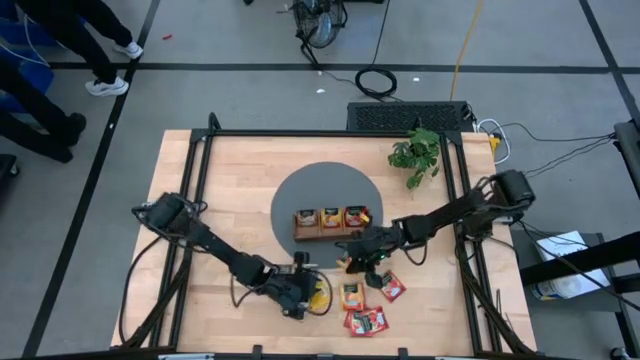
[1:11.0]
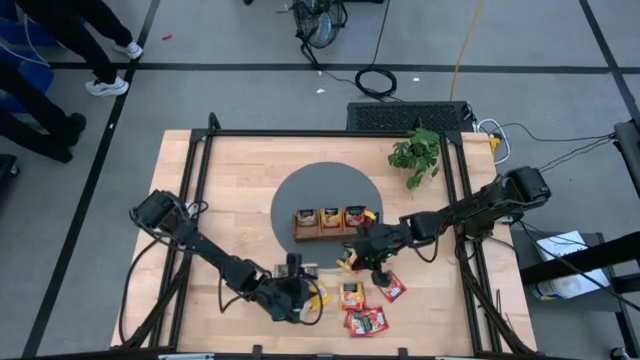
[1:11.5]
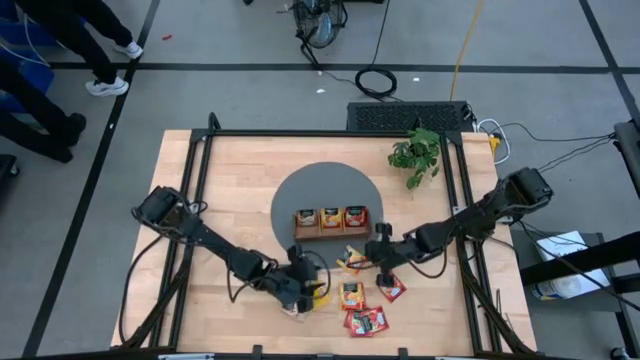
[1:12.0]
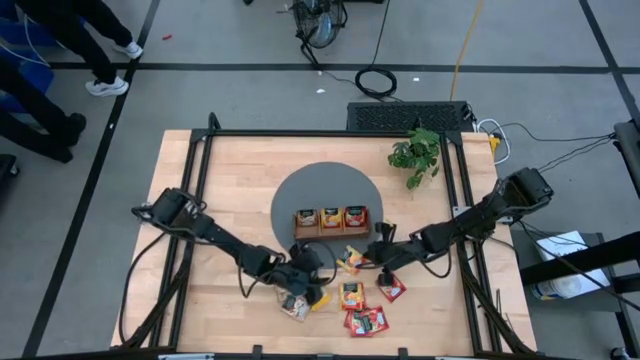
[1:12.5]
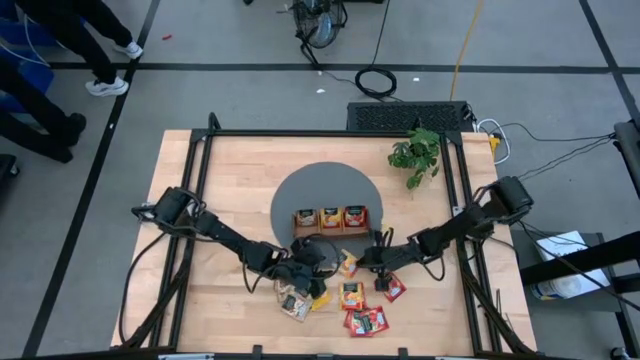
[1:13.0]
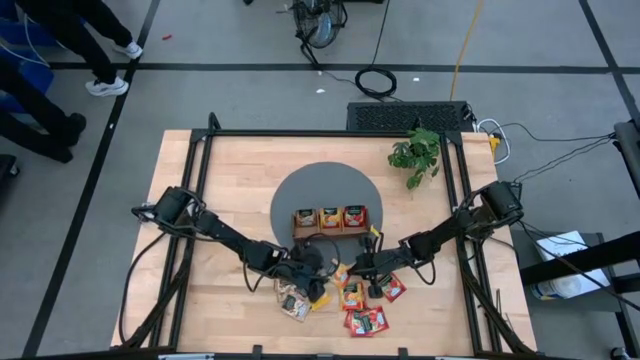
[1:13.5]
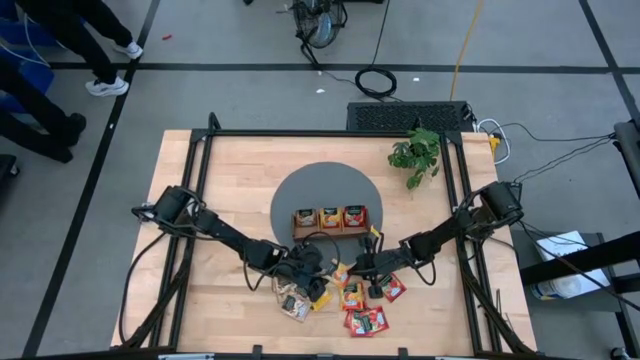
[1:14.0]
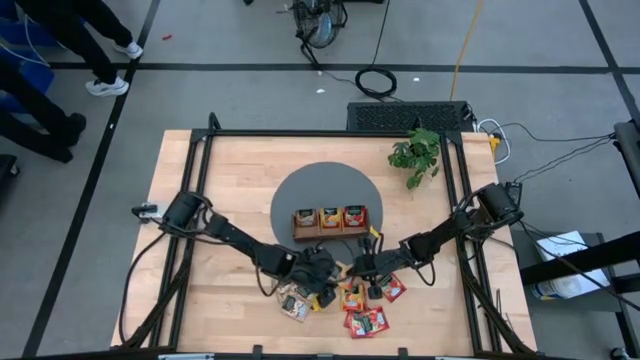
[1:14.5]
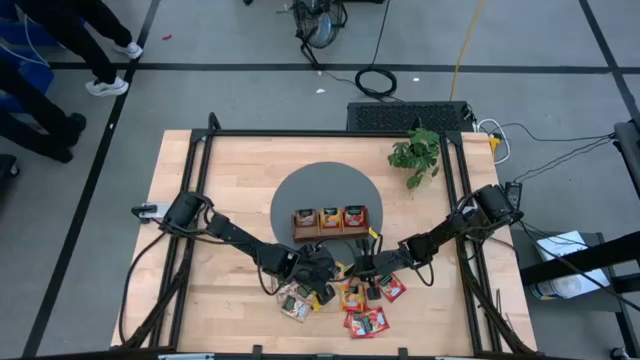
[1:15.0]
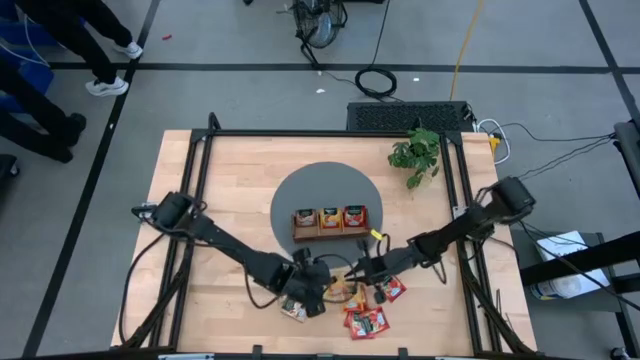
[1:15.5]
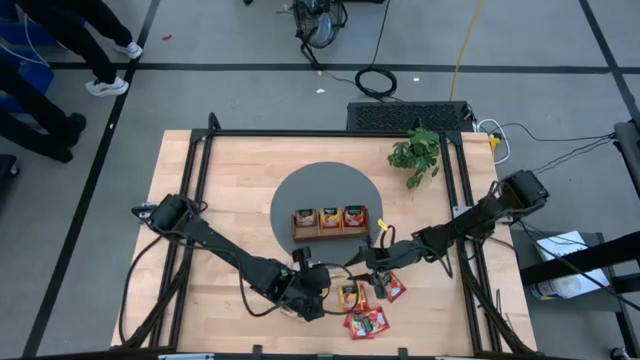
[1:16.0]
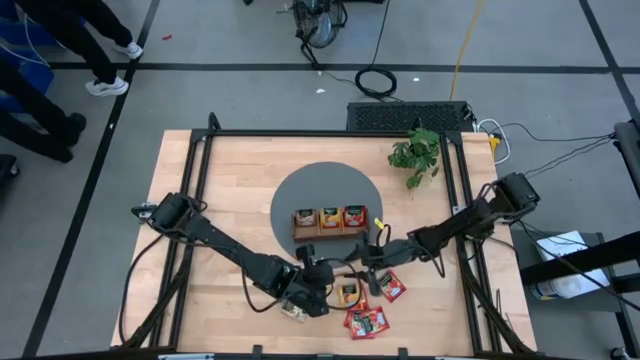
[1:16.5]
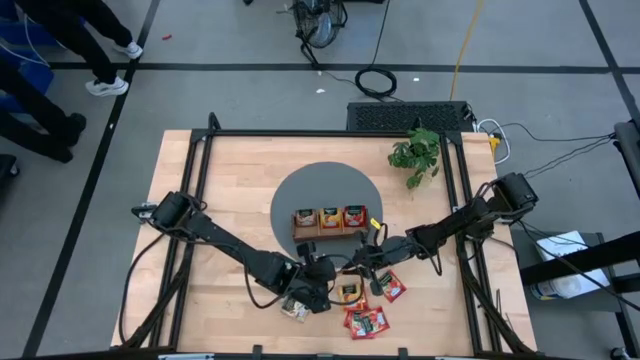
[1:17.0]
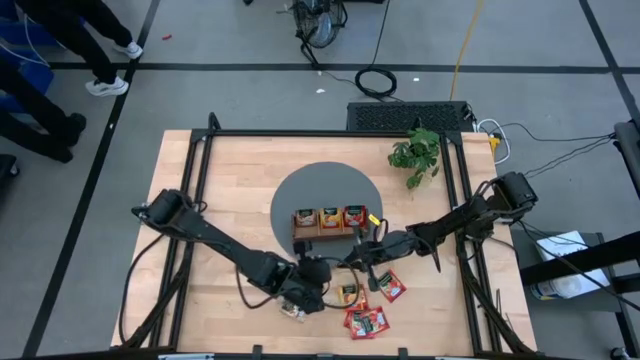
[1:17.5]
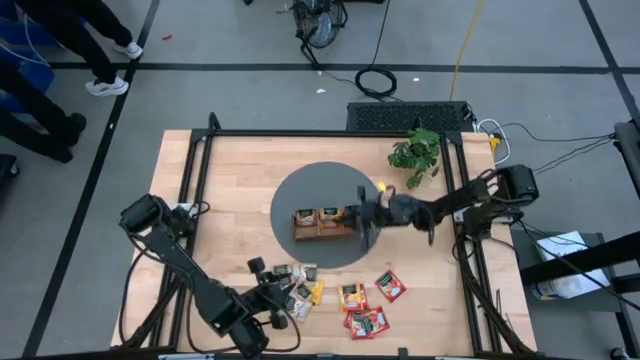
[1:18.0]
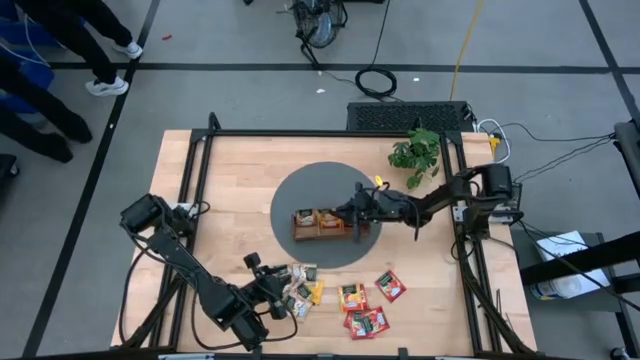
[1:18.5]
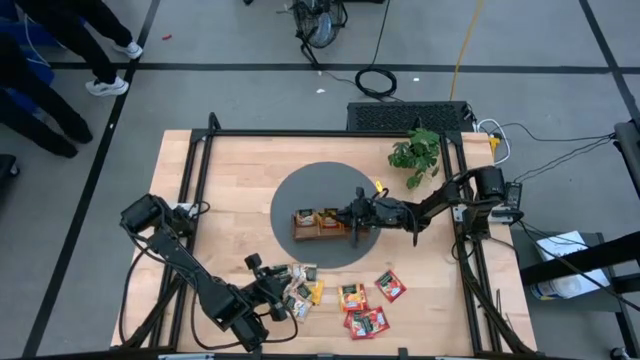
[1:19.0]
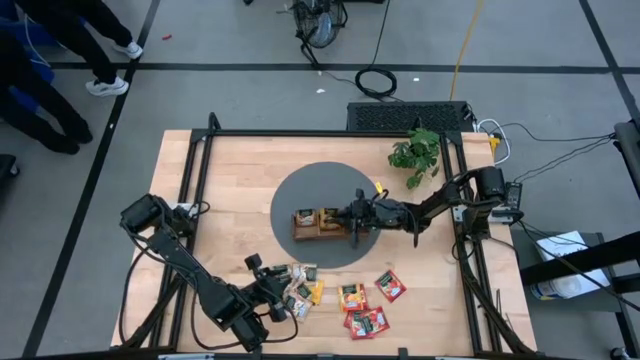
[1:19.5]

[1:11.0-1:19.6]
Task: Pick & Place Tea
Put the top orange tea bag into the middle slot of the wooden organizer

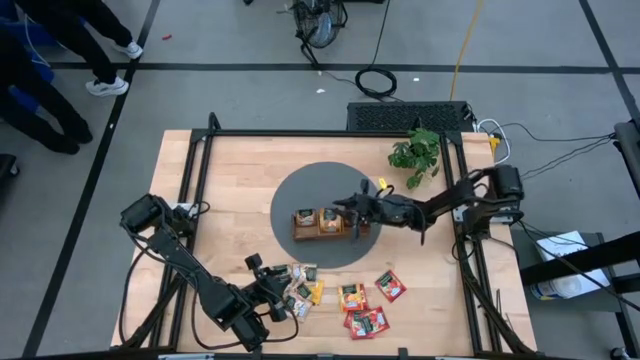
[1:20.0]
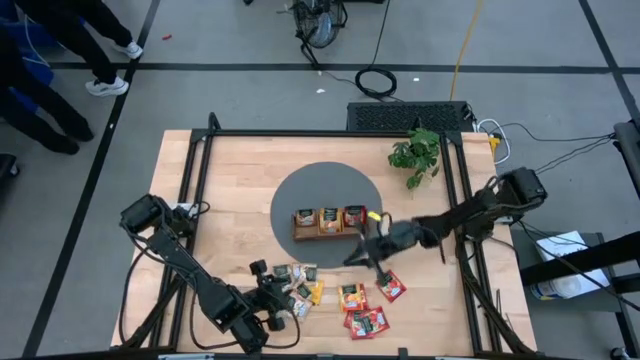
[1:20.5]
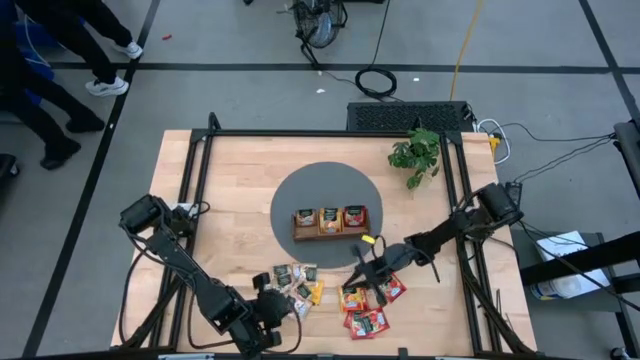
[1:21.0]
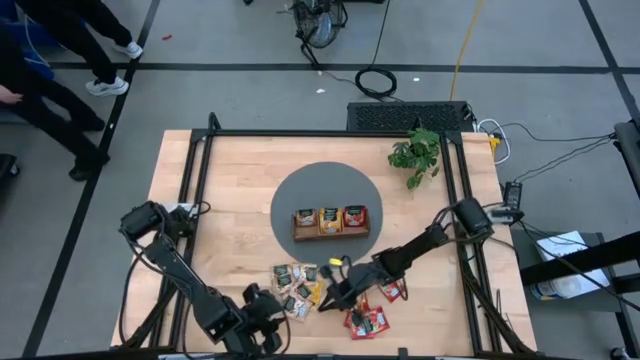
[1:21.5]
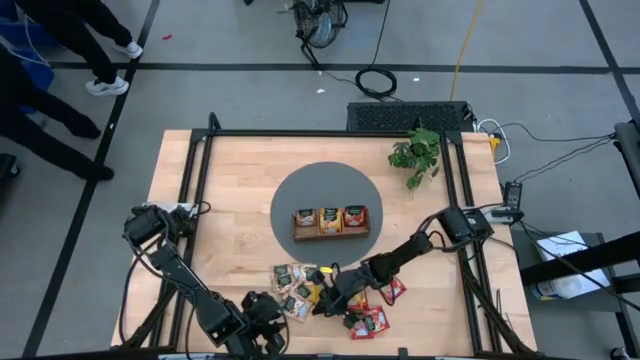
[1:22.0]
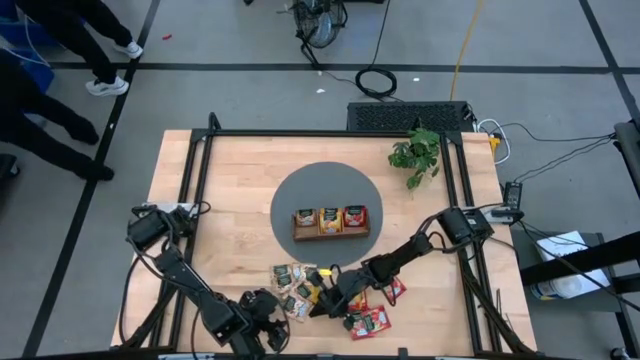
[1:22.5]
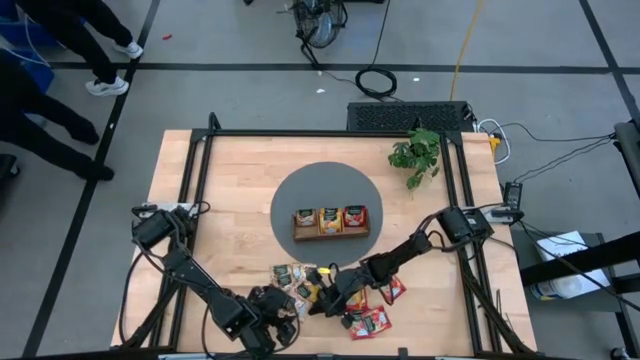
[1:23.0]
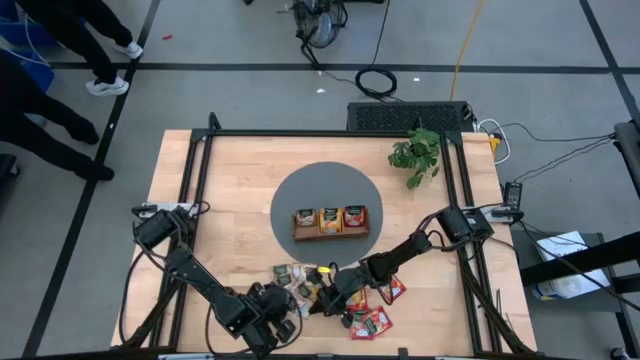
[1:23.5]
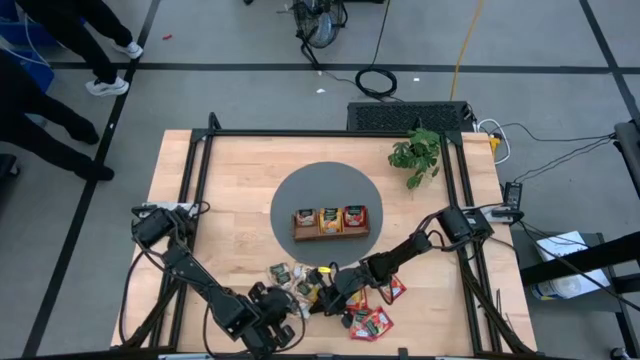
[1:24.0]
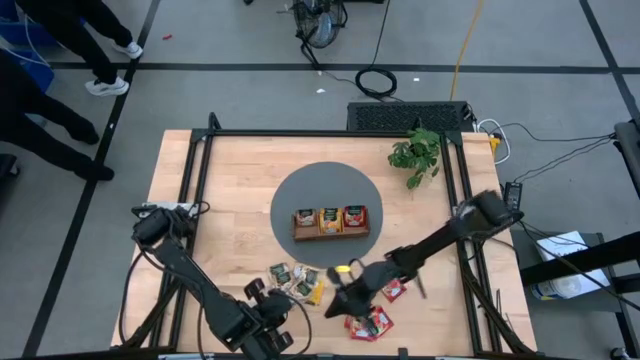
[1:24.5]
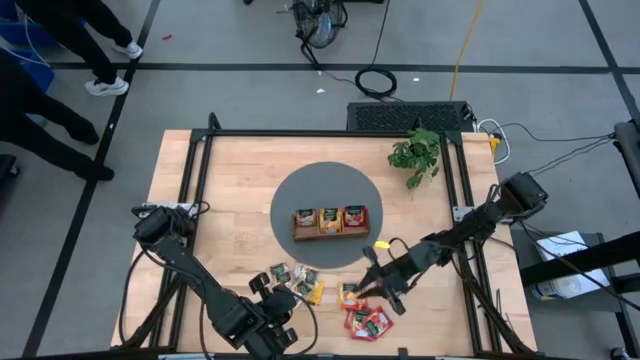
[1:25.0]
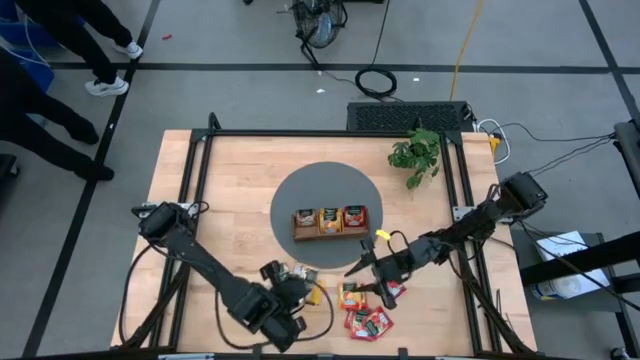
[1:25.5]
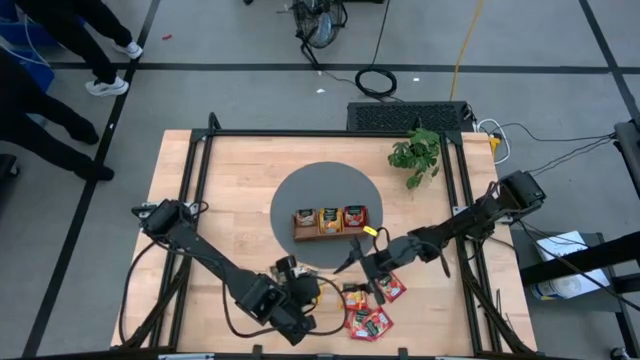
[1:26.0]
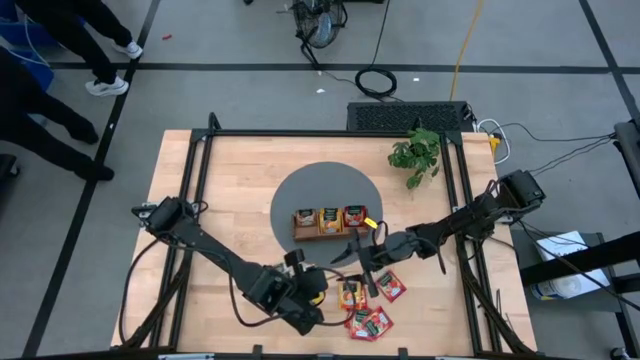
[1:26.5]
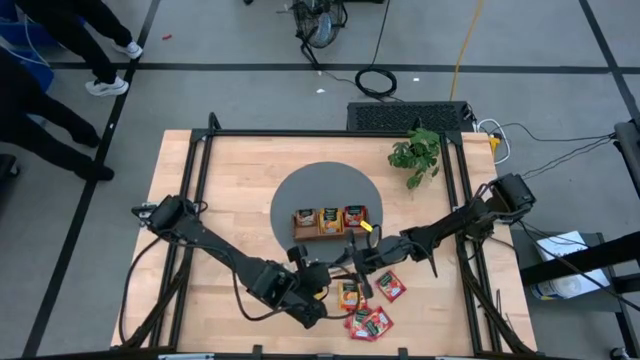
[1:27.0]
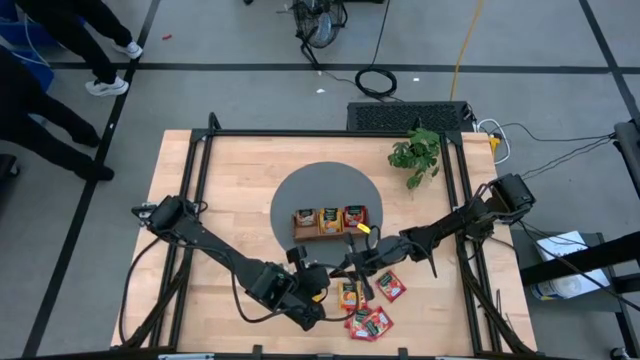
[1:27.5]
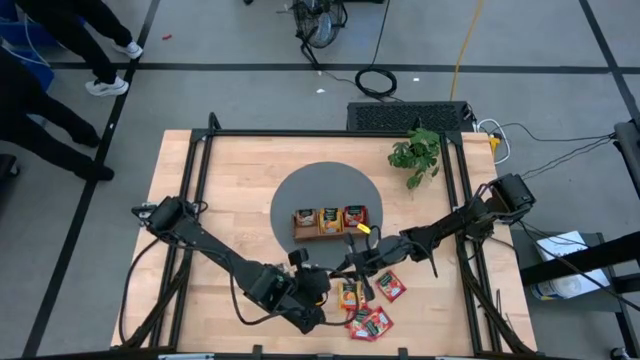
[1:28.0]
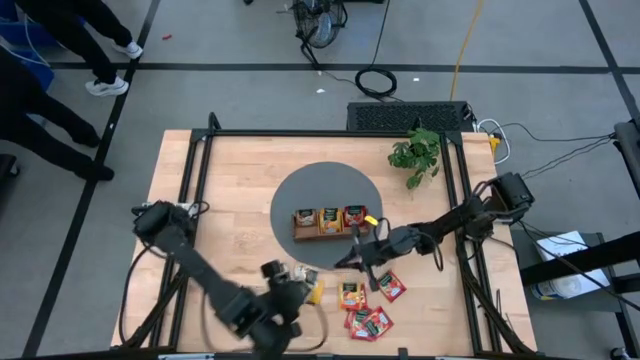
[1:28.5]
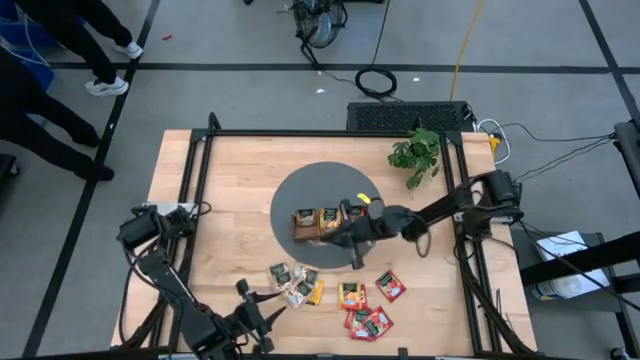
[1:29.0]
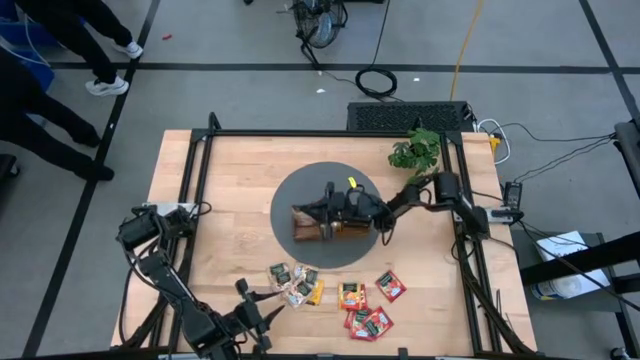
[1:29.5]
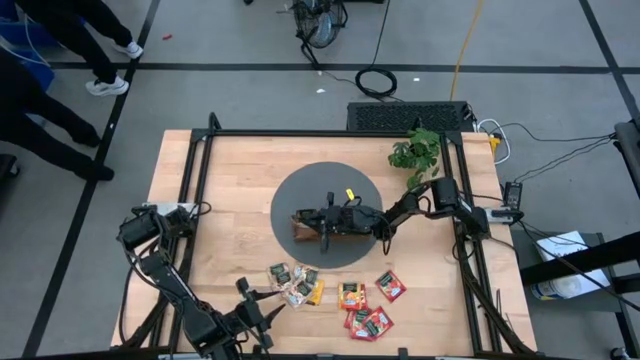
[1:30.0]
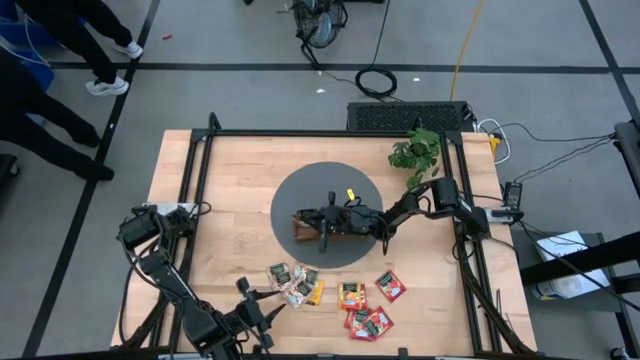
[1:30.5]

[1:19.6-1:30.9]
Put the brown tea bag into the left slot of the wooden organizer

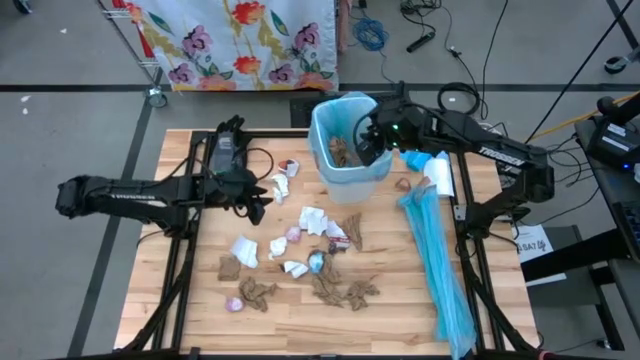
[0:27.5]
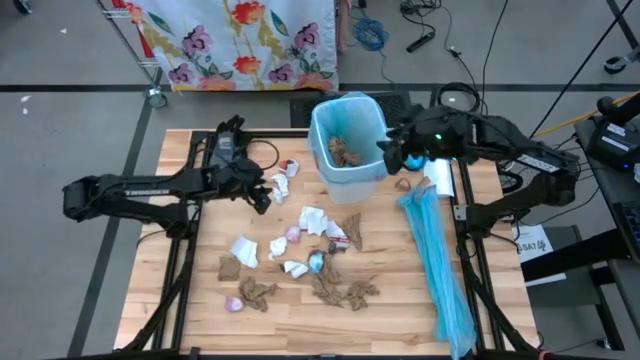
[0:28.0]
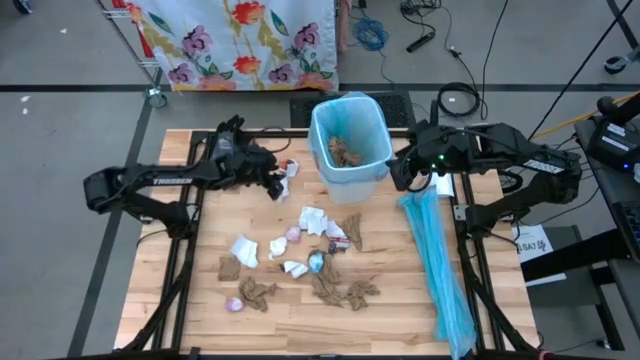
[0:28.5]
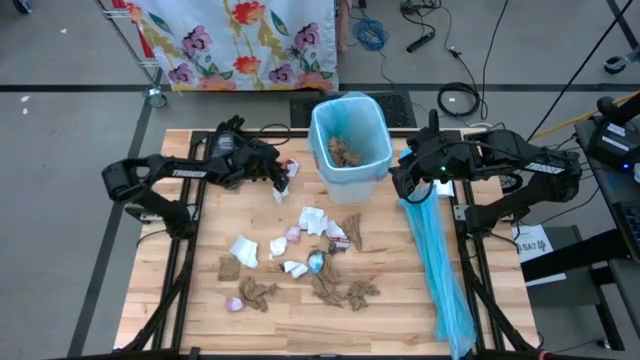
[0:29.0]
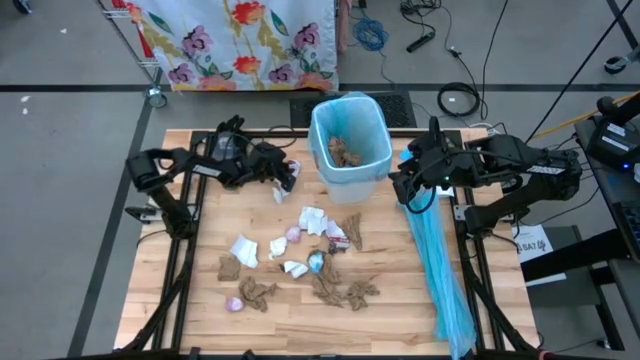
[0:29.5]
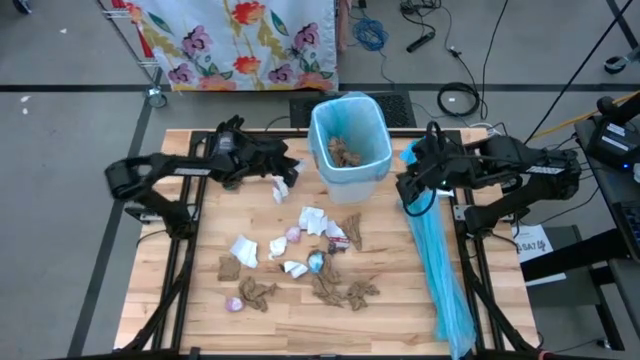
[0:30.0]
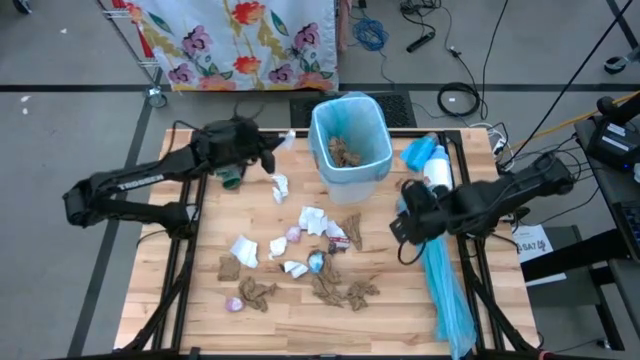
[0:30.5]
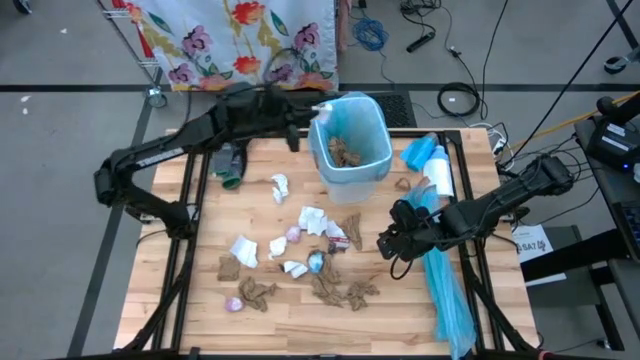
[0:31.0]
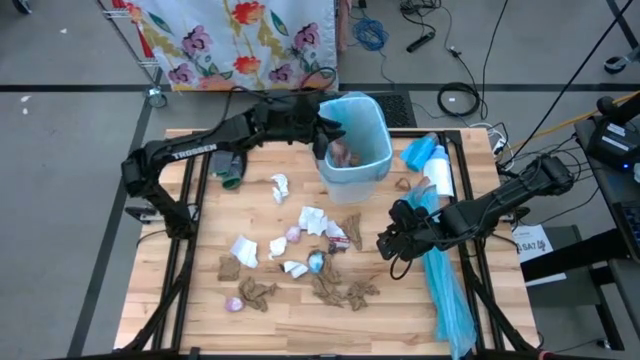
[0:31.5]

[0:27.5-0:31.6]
Task: place trash/remove bag and relplace
Put the piece of magazine into the trash bin
